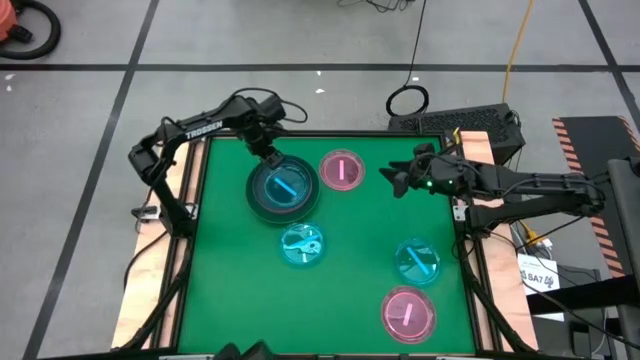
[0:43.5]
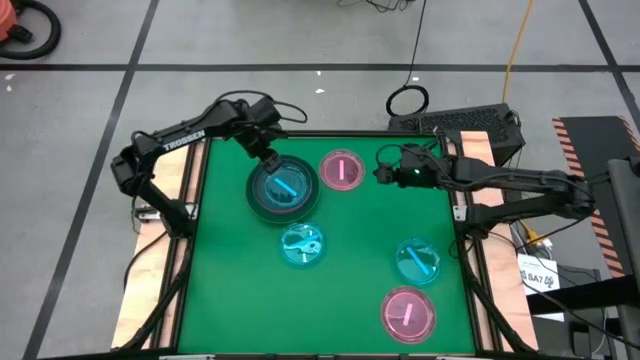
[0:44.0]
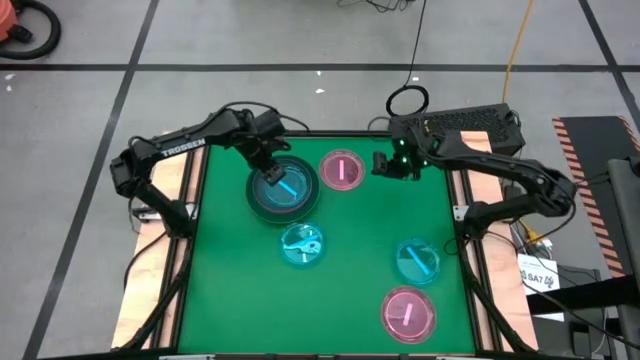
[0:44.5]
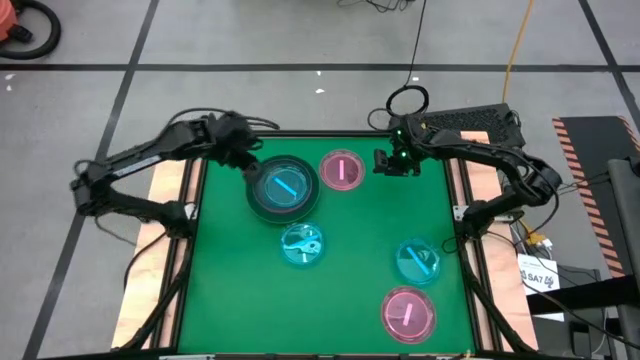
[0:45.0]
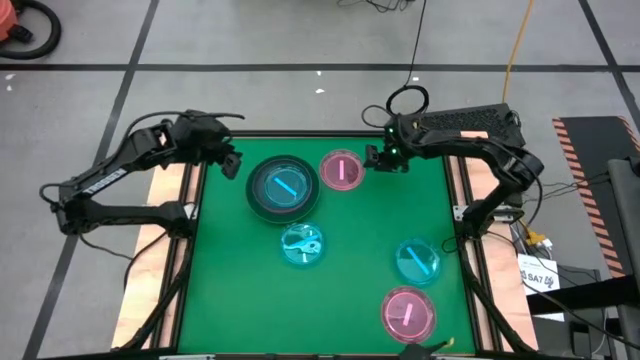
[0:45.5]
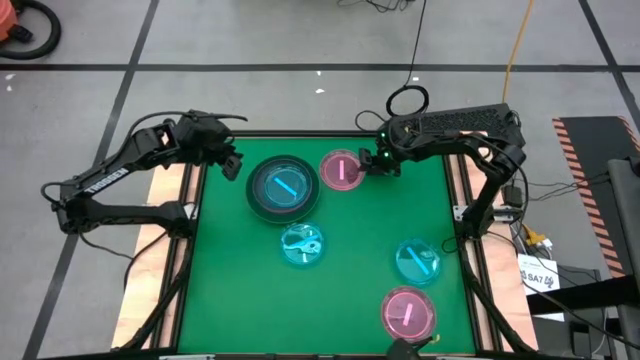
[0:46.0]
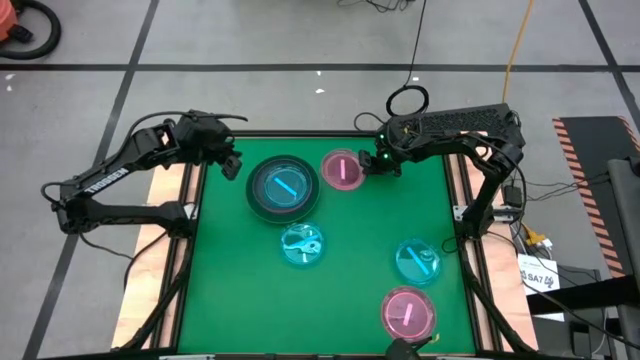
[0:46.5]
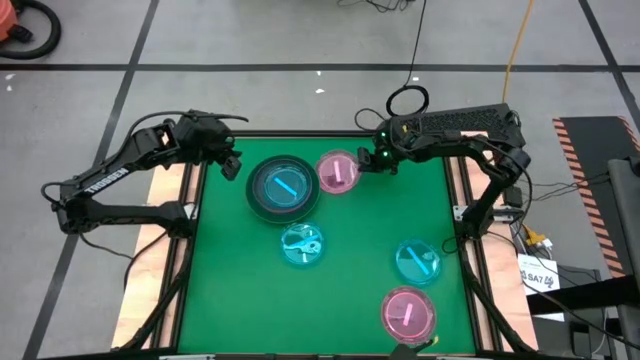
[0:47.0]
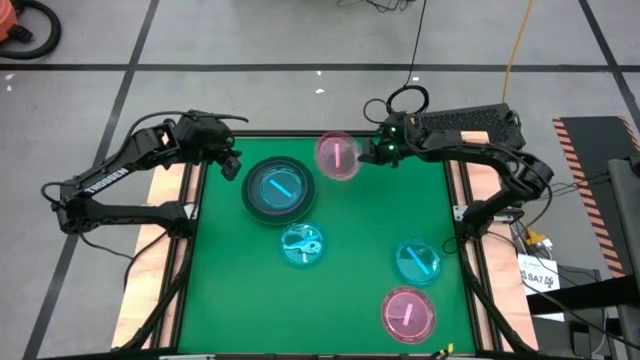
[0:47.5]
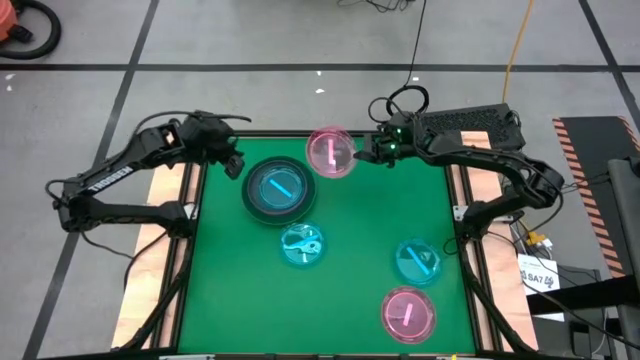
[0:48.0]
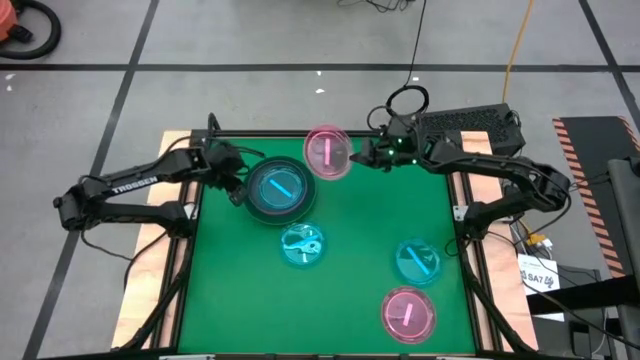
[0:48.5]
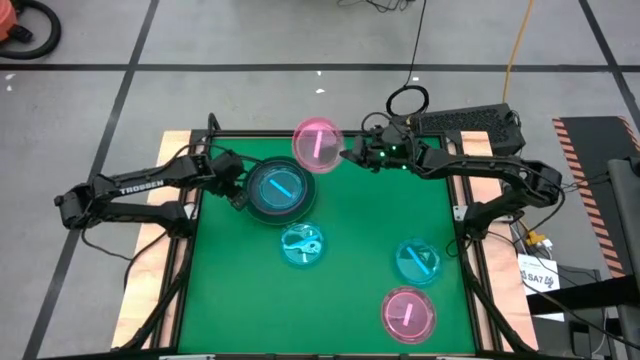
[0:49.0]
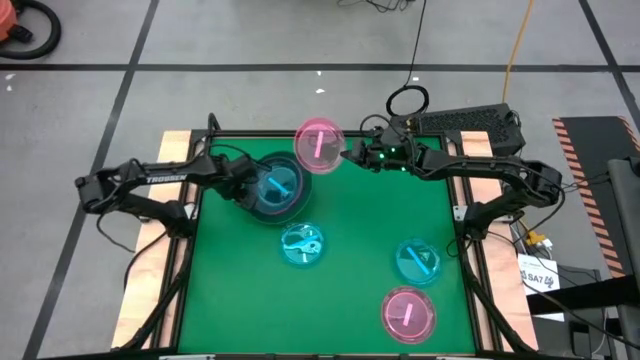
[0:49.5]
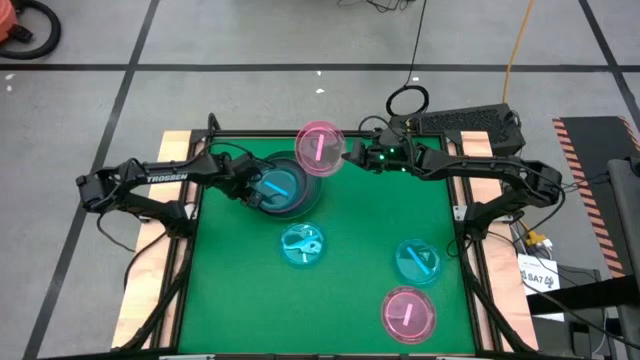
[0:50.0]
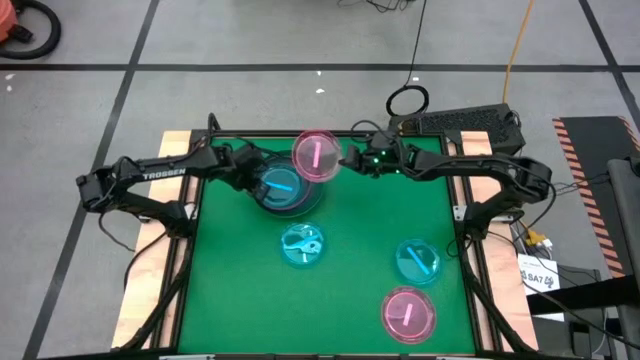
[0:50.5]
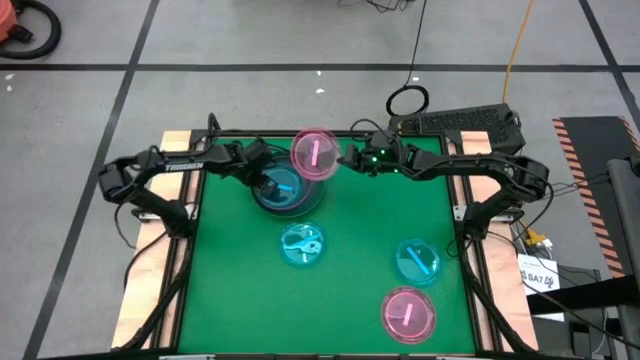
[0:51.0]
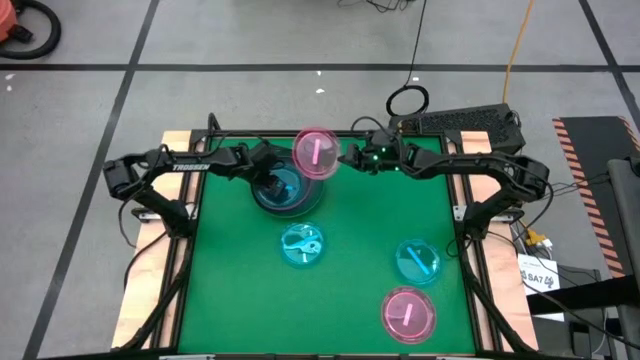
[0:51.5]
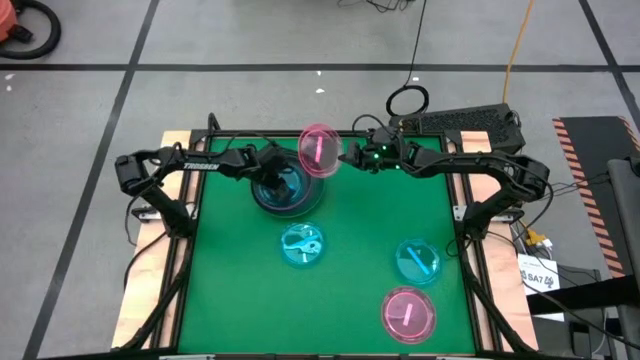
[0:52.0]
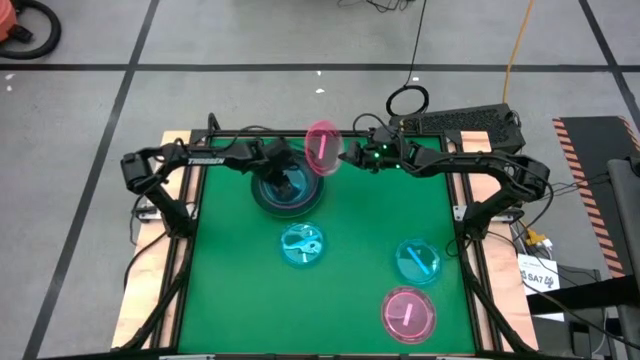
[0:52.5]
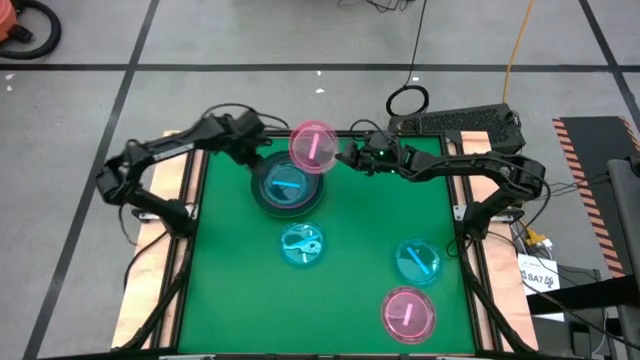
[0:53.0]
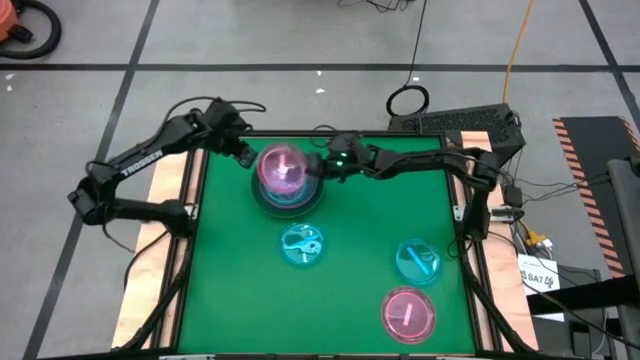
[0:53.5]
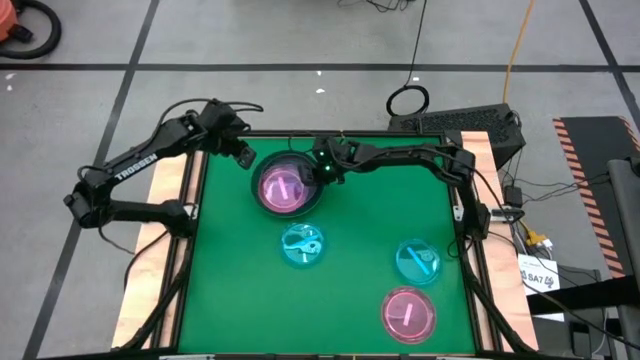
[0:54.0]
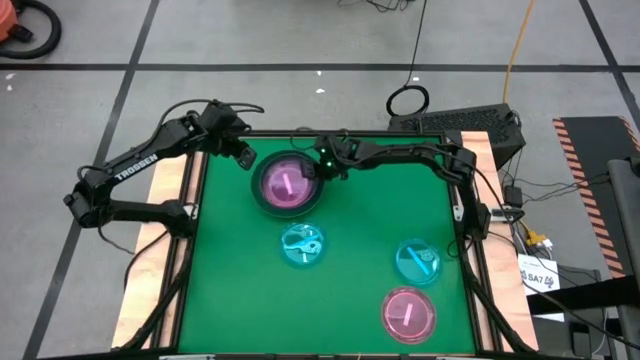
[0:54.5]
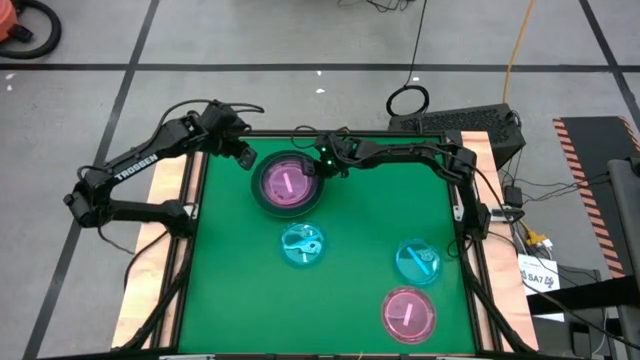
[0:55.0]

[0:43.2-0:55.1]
Task: Stack plastic plates
Stack the top pink plate on the blue plate

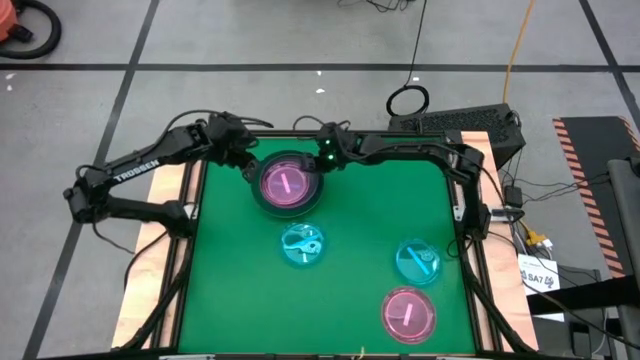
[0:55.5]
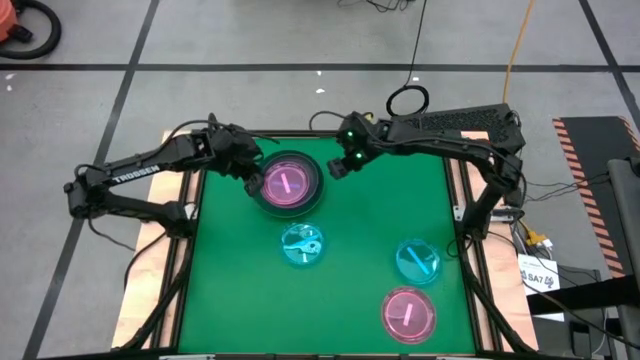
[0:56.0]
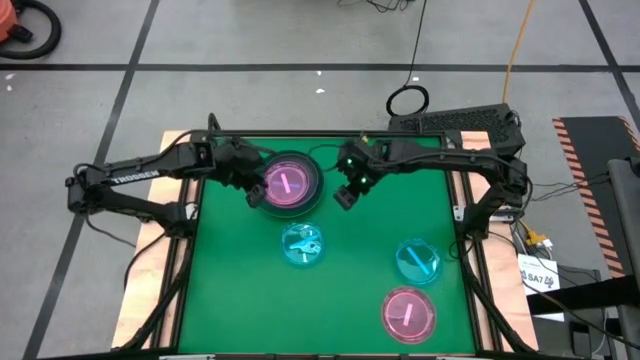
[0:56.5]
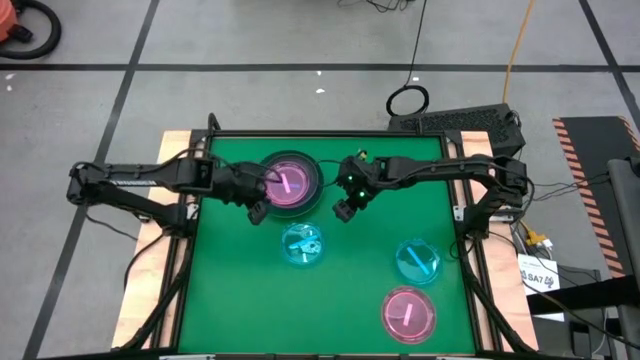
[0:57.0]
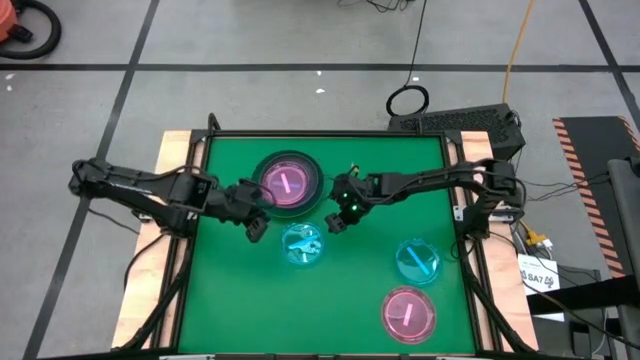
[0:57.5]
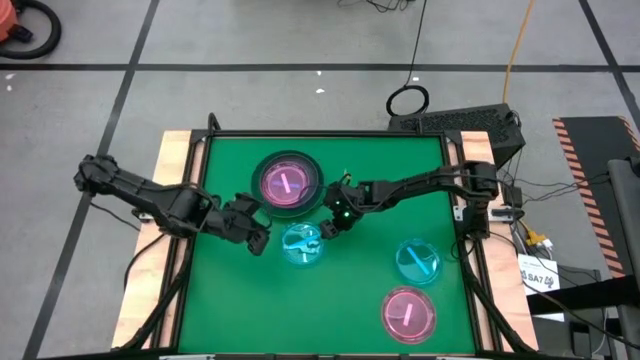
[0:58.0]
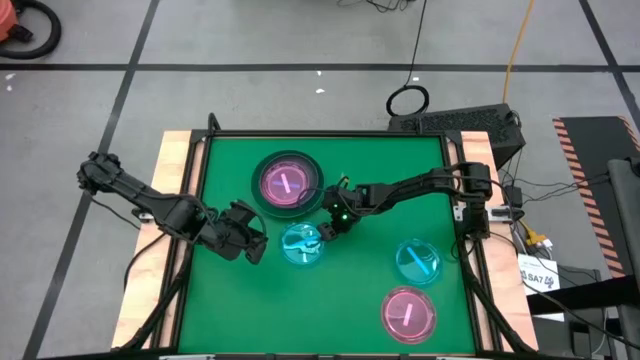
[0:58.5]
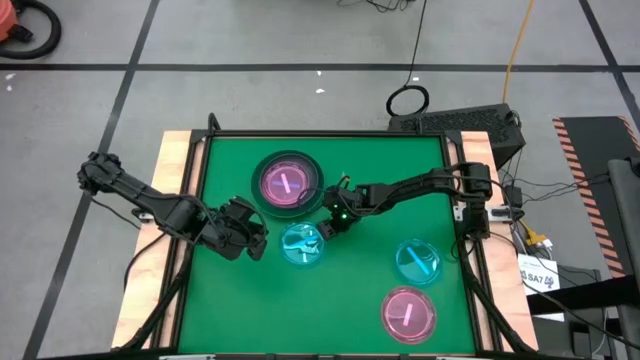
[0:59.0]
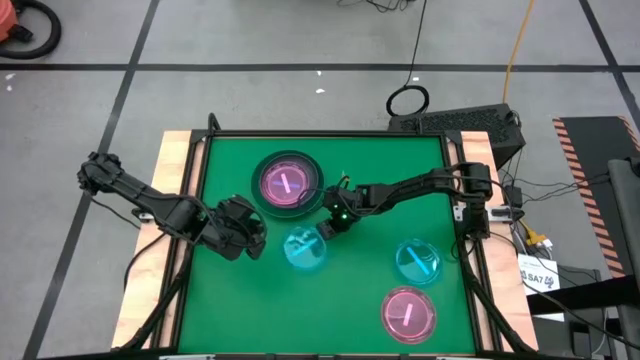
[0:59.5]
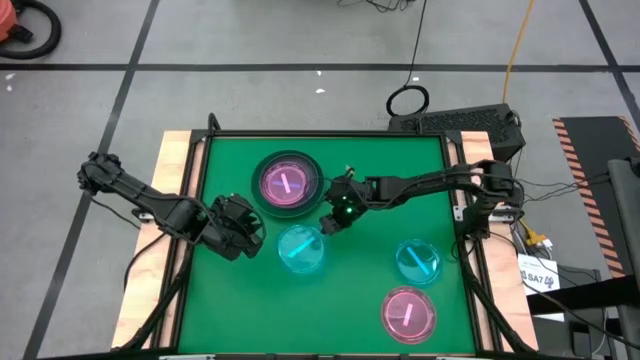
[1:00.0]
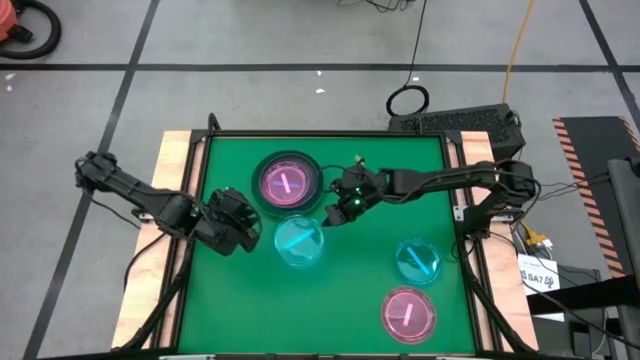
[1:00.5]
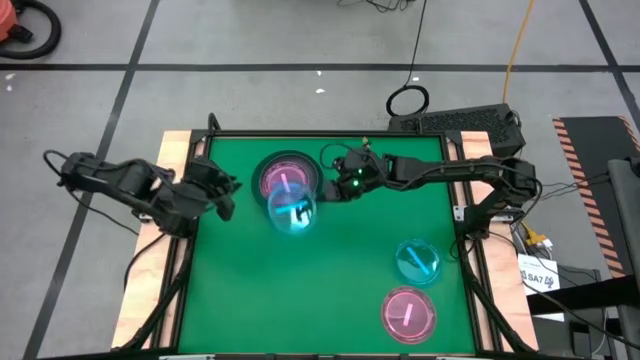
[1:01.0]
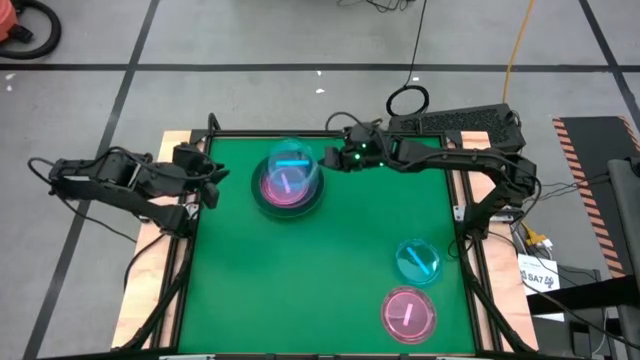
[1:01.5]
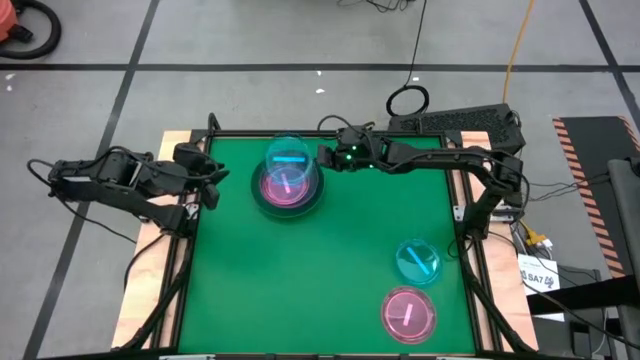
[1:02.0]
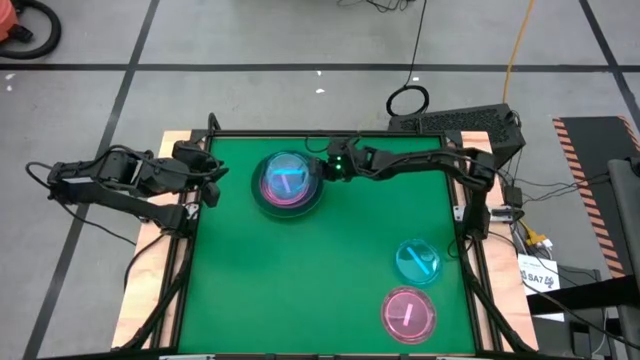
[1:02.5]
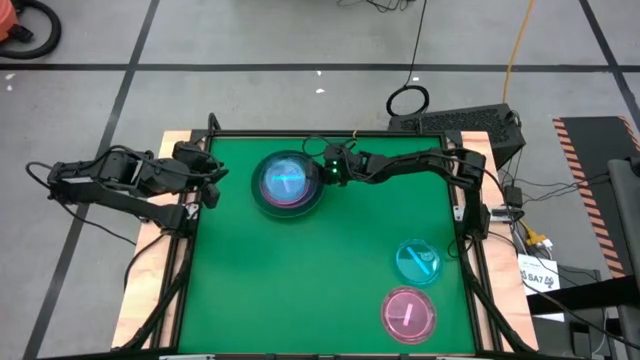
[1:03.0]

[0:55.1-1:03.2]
Stack the left blue plate on the pink plate

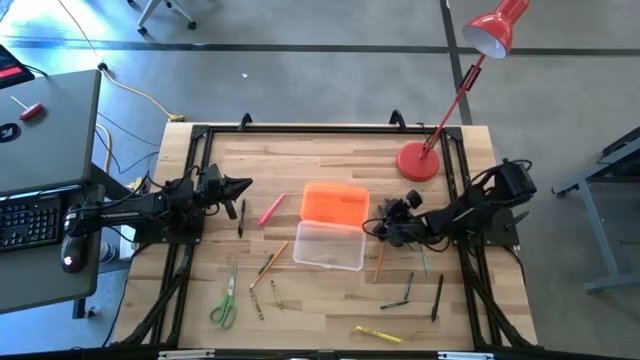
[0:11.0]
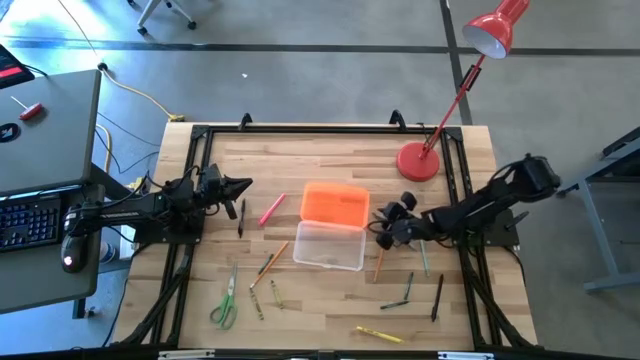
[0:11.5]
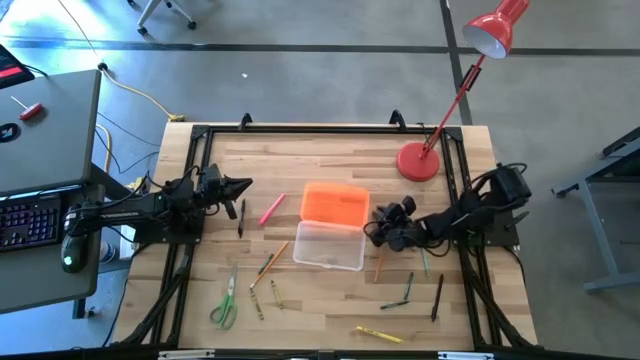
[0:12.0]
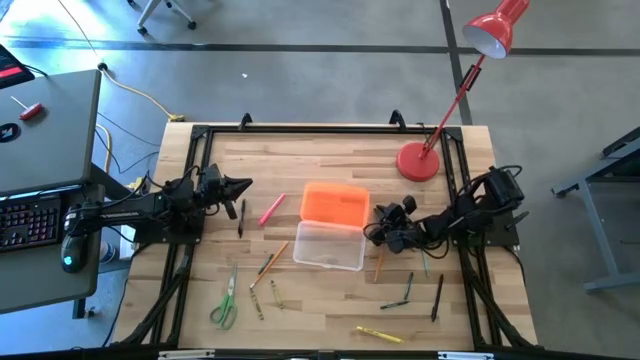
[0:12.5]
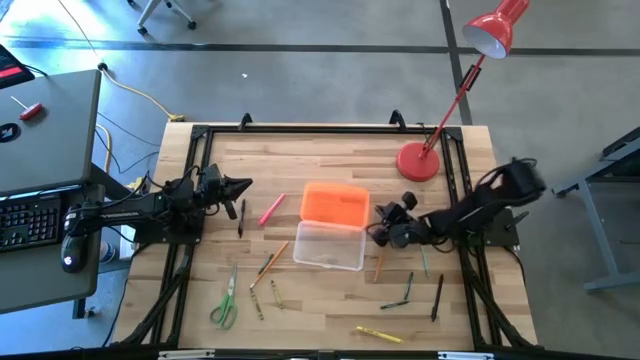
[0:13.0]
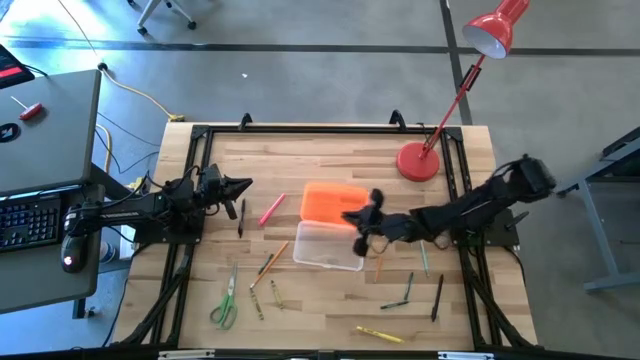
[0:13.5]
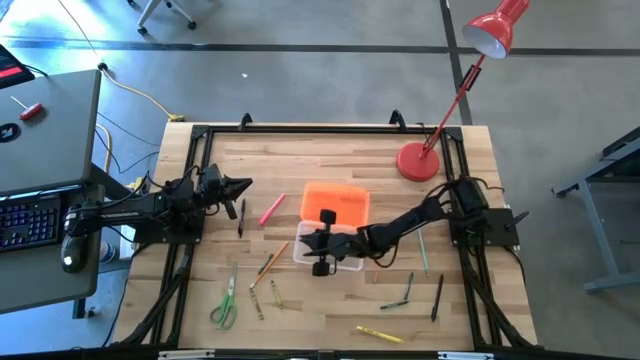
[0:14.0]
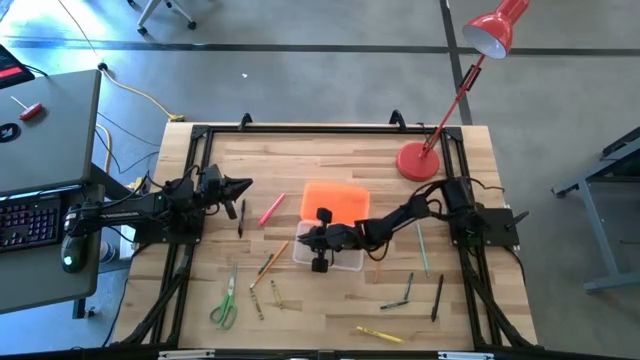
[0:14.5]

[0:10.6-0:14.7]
Task: Pick & place school supplies into a supply box
Put the blue pencil into the supply box
